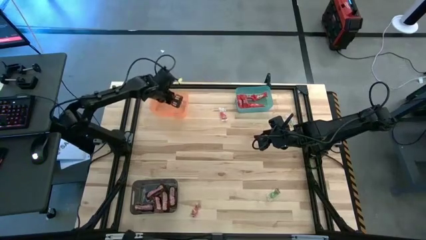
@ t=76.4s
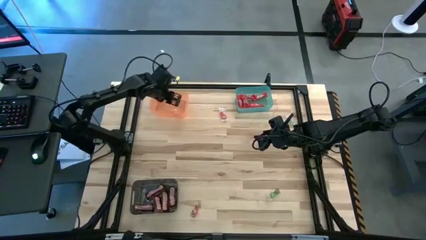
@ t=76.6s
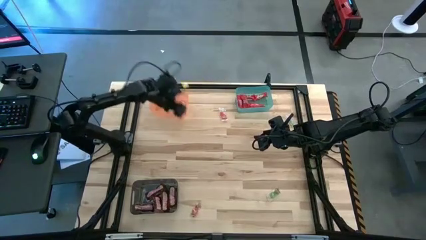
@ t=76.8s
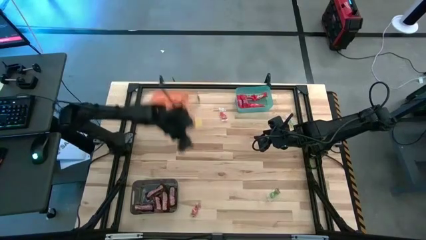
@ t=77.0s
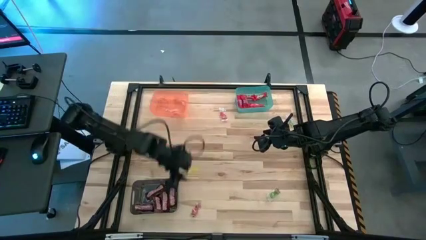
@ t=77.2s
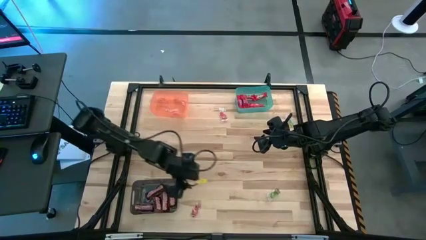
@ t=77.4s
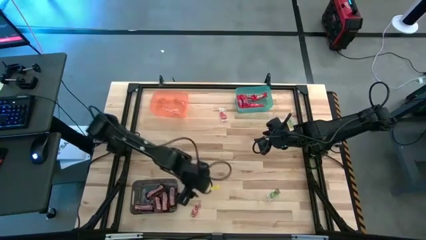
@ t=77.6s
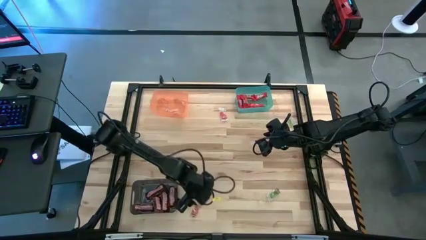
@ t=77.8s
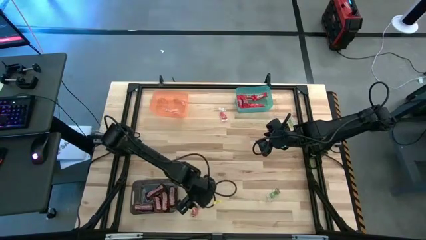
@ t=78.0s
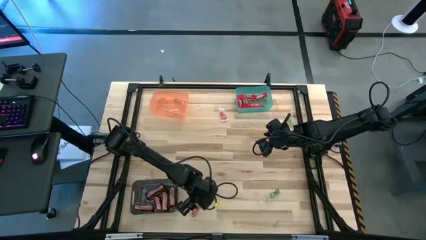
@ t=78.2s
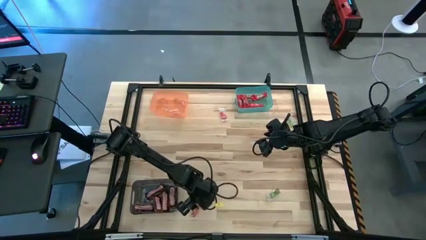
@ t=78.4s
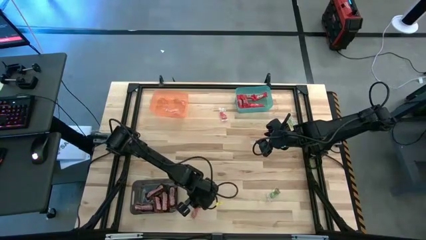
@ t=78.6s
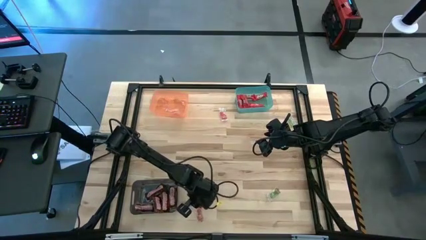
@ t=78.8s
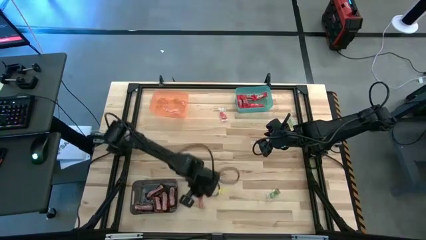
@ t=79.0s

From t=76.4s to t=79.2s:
Task: Sort candy by brand, put in halloween buckets
Put the red gummy into the orange bin

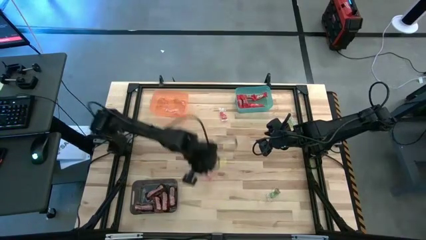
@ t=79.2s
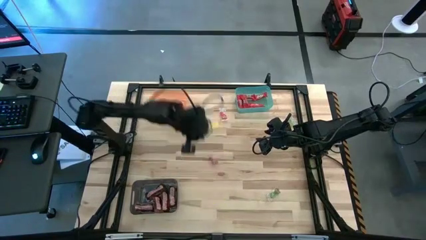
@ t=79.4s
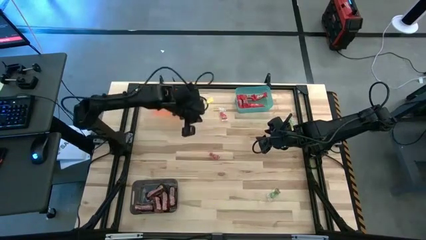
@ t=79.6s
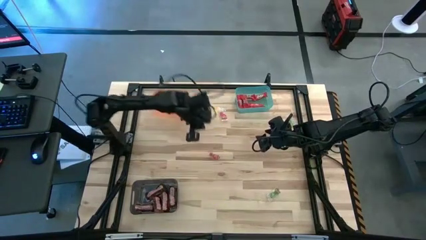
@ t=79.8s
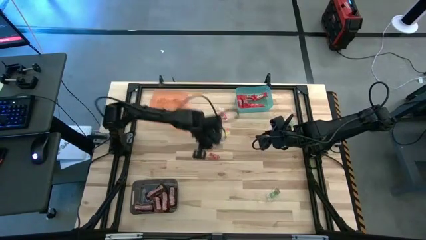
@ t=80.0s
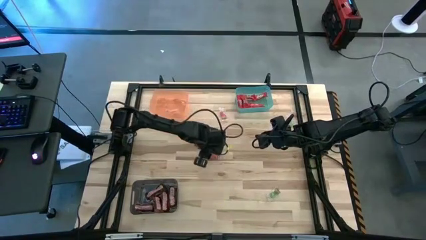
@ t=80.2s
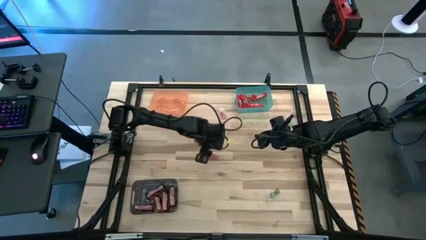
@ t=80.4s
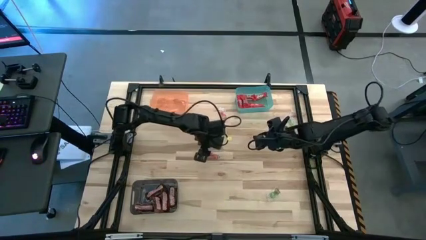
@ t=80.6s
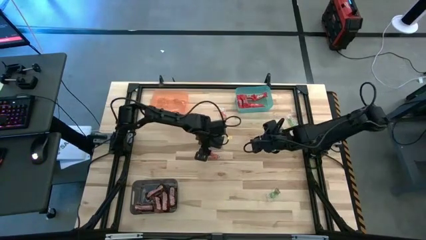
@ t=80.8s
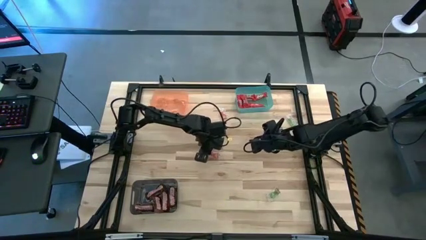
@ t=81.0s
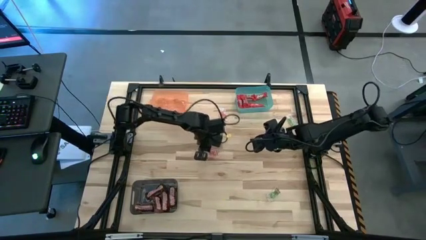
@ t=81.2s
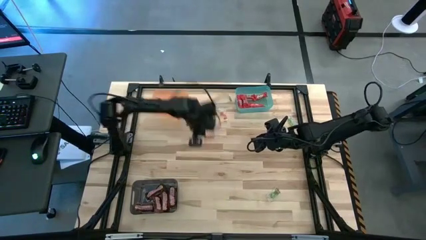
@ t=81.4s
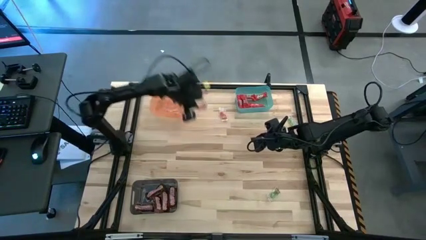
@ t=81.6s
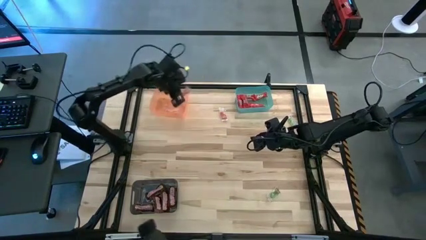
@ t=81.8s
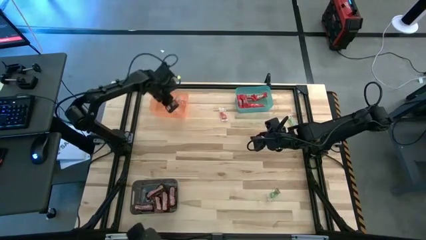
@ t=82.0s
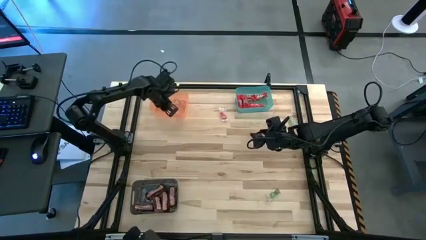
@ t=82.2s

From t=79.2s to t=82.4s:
Put the red gummy into the orange bin

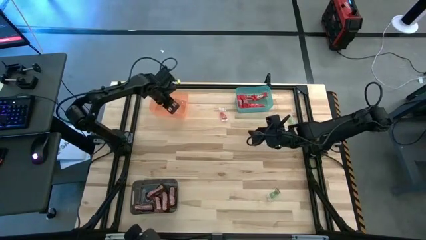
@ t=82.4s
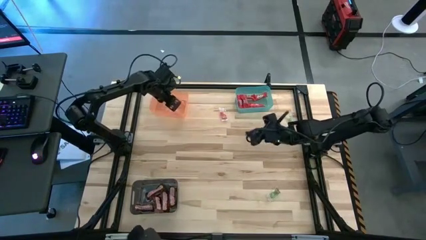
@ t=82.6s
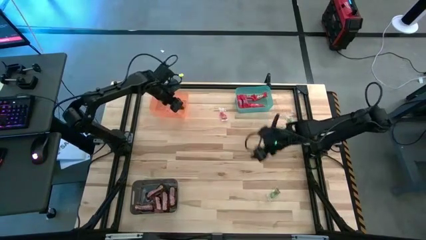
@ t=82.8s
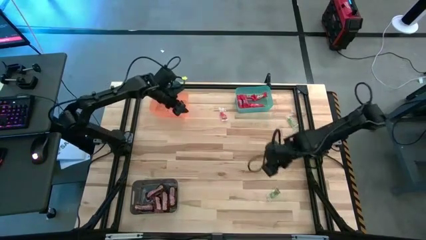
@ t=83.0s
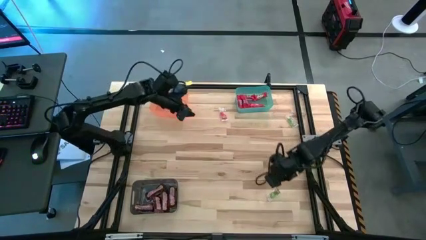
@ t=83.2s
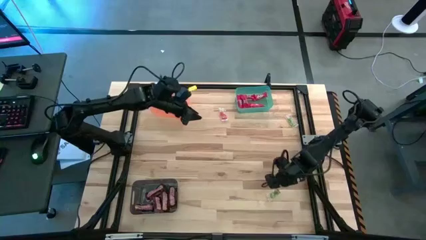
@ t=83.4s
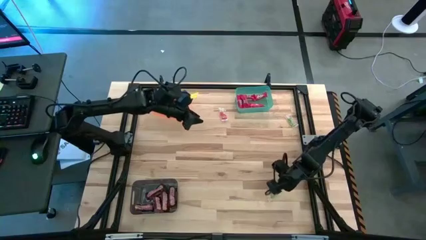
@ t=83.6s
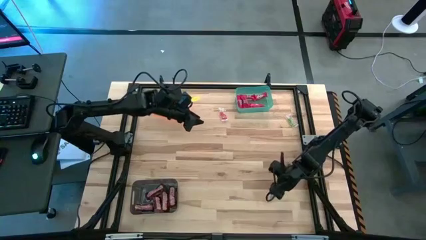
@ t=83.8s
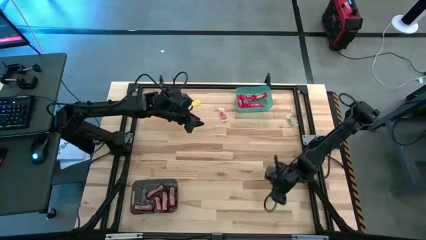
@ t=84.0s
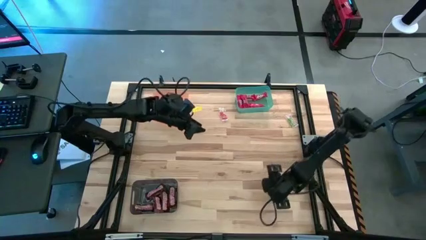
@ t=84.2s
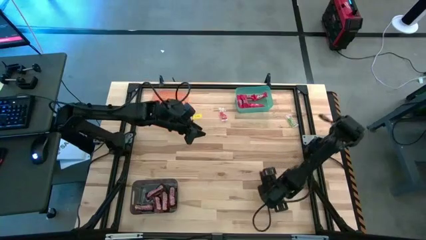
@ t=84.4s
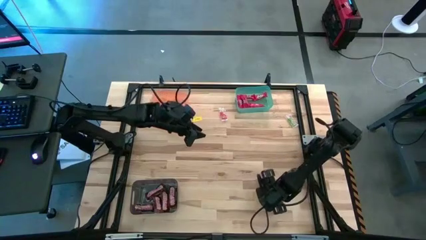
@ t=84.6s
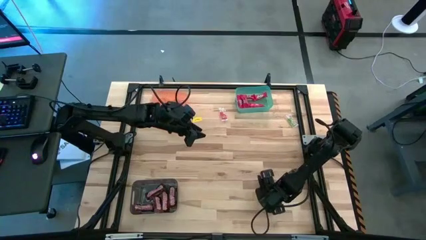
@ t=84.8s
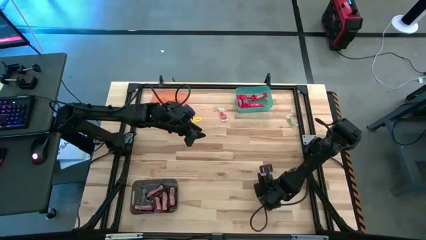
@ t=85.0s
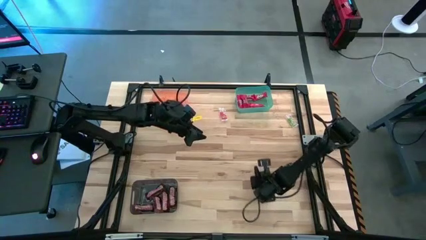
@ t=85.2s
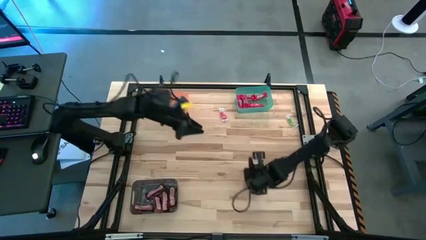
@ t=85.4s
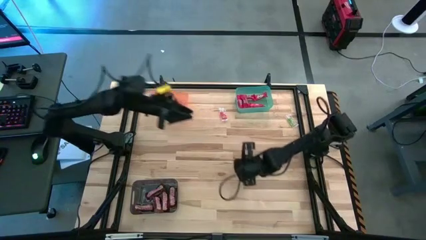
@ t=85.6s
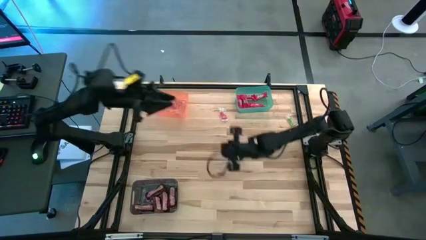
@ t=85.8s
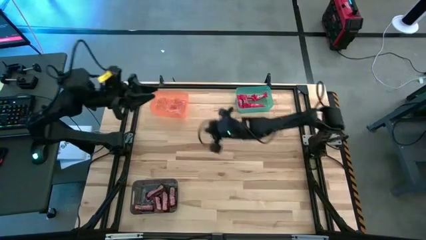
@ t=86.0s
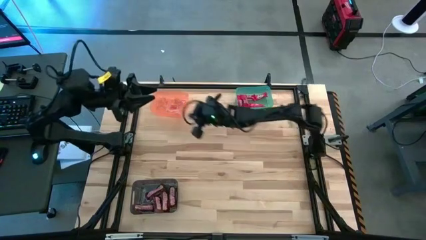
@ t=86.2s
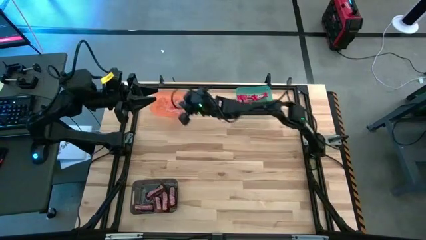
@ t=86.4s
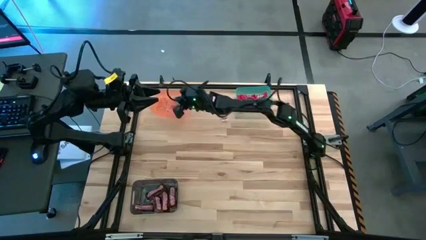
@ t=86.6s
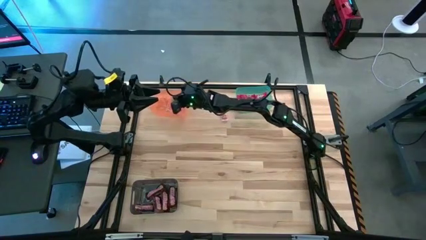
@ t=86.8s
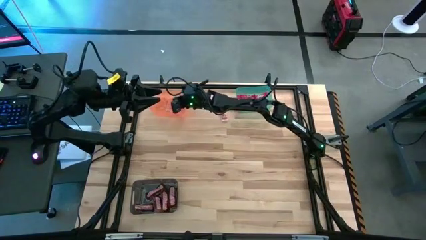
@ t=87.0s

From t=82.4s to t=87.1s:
Put the green gummy into the orange bin

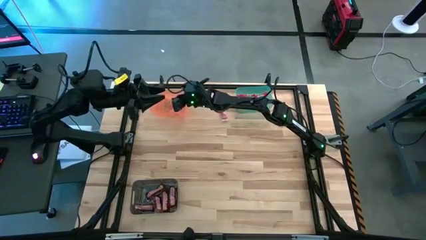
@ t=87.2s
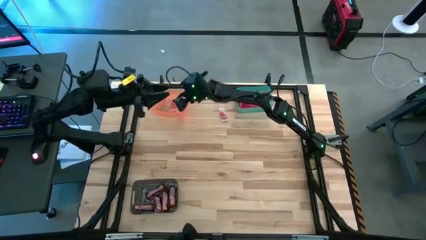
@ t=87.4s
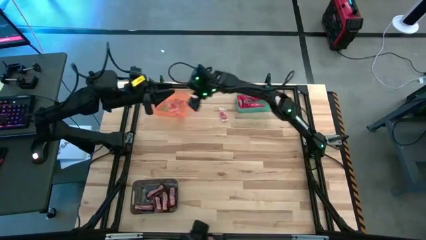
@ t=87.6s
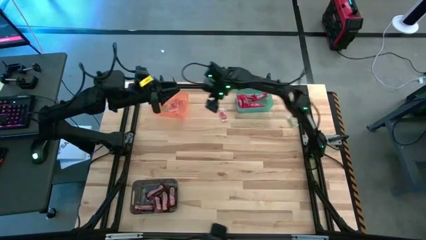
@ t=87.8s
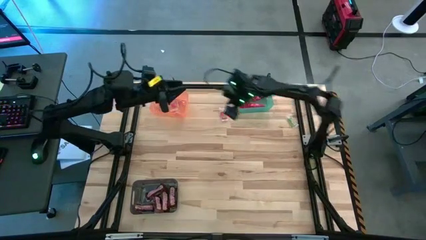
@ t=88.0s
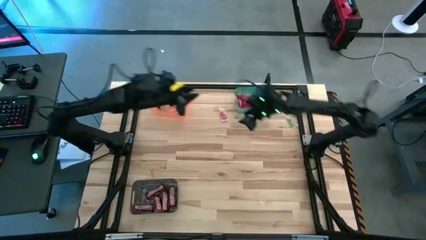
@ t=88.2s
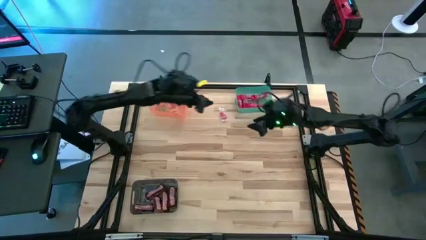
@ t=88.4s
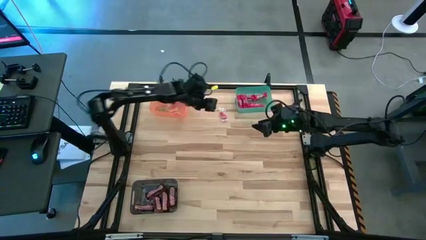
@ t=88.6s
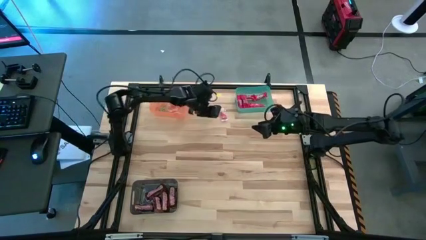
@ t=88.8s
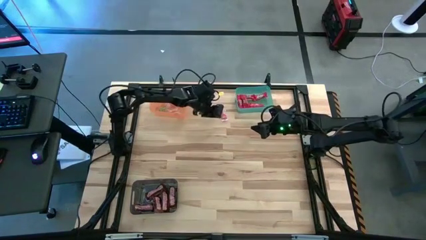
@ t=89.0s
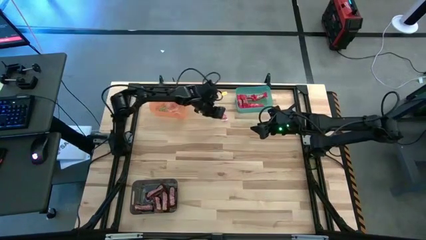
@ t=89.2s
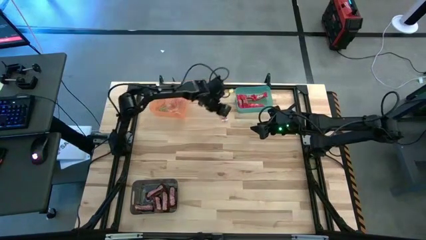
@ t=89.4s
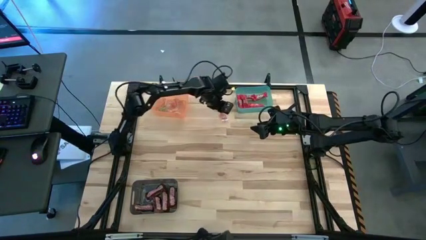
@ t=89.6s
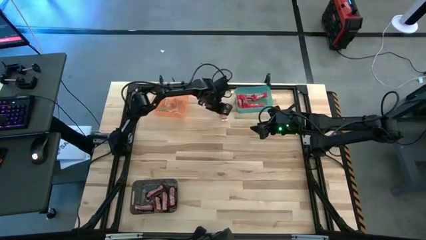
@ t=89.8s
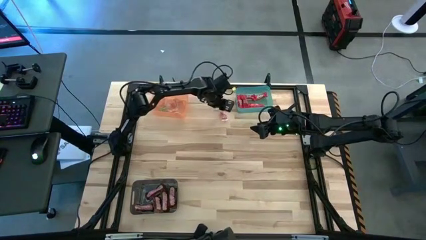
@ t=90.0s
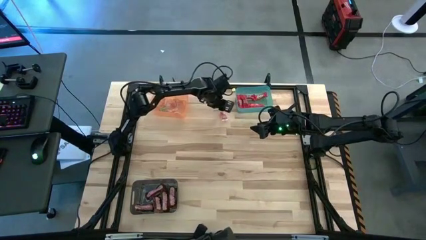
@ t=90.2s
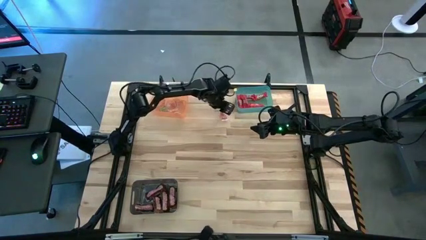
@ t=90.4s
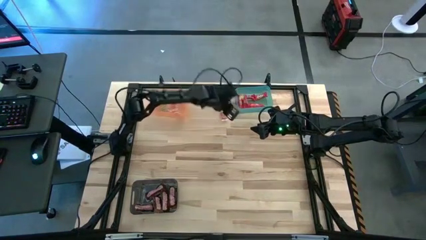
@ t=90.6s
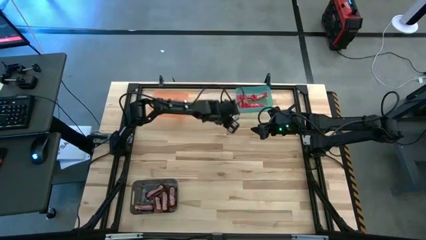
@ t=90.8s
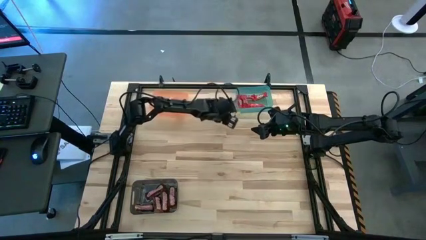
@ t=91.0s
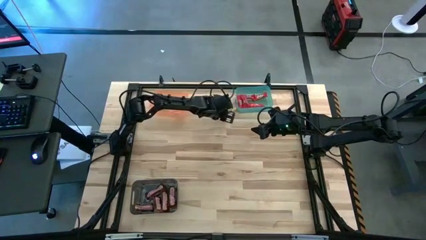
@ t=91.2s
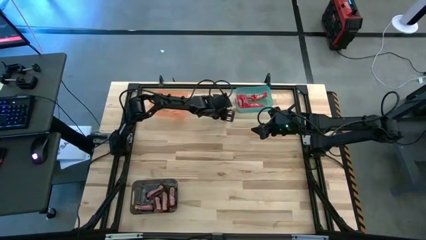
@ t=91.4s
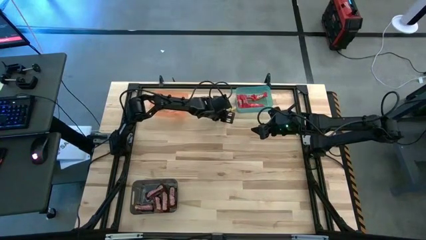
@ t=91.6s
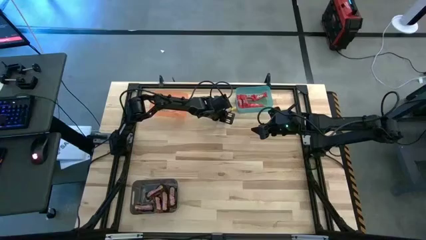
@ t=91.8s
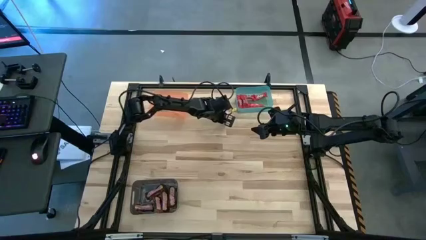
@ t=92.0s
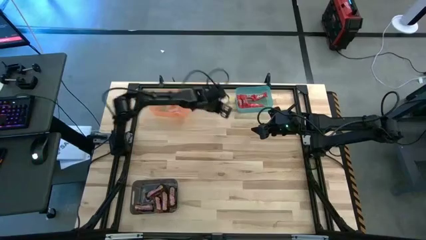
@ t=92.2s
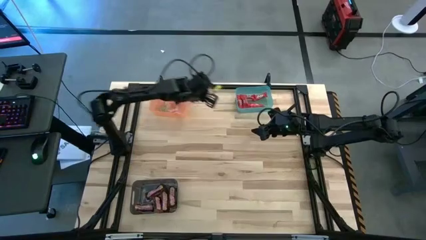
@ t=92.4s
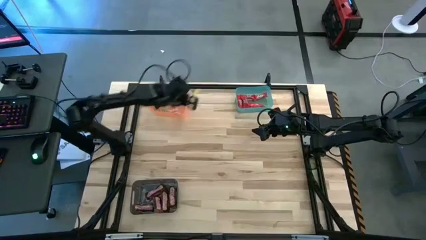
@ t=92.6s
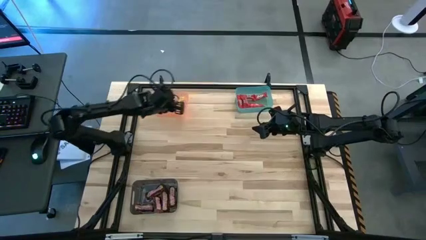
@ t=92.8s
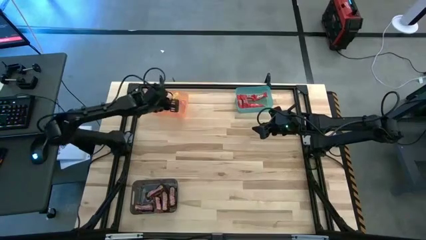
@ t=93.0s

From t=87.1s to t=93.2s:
Put the red gummy into the orange bin
